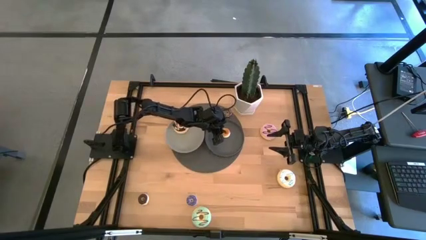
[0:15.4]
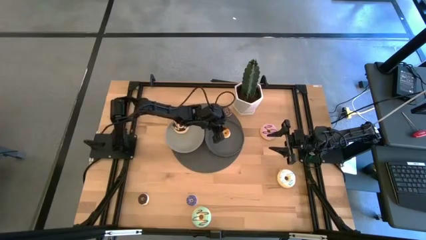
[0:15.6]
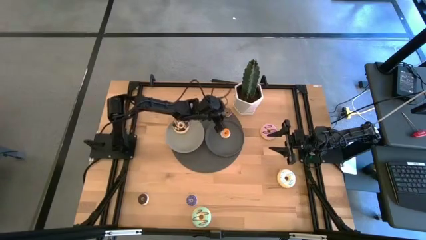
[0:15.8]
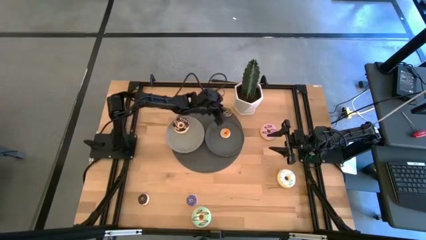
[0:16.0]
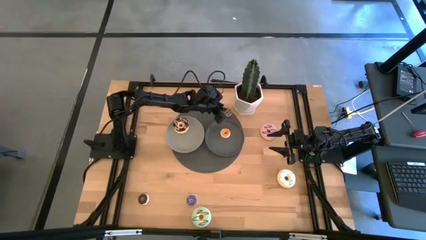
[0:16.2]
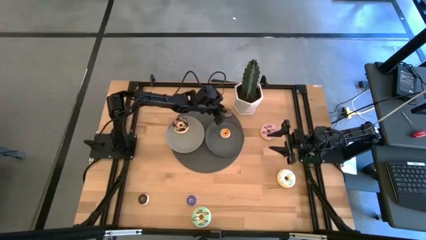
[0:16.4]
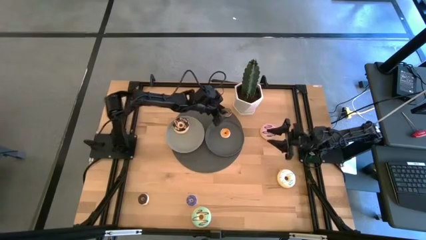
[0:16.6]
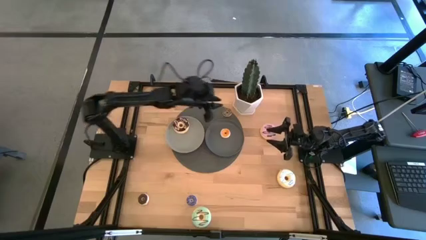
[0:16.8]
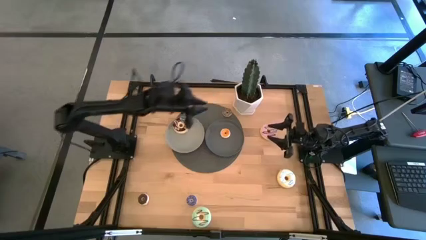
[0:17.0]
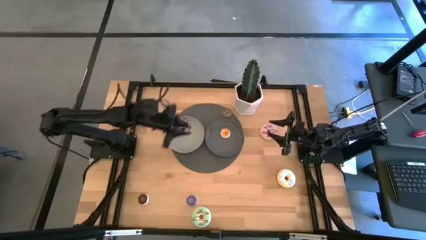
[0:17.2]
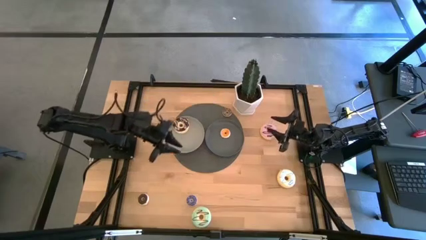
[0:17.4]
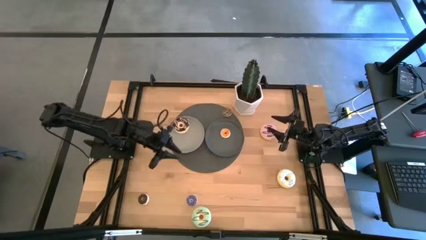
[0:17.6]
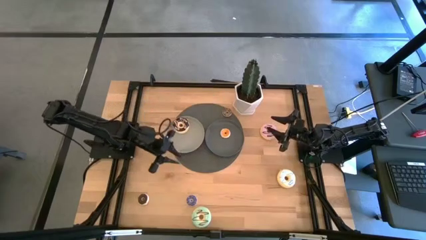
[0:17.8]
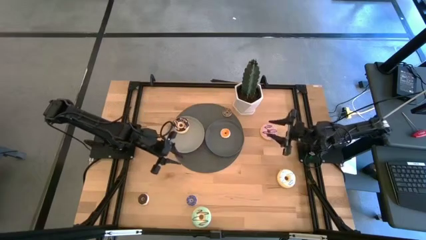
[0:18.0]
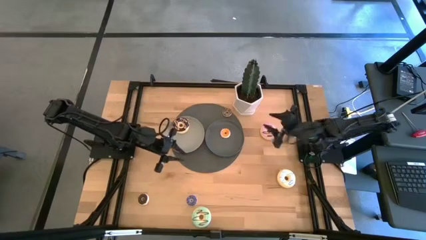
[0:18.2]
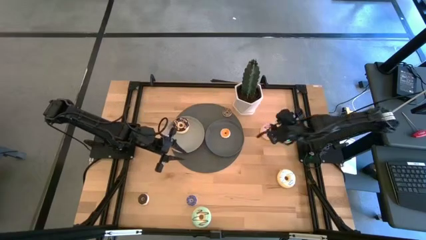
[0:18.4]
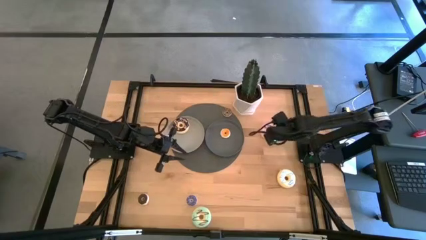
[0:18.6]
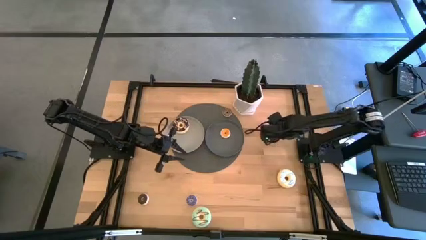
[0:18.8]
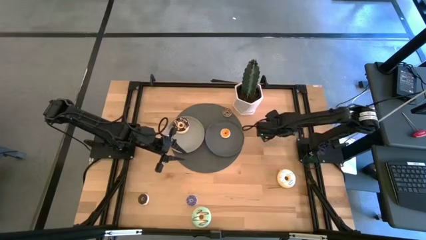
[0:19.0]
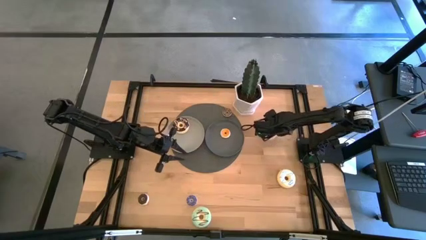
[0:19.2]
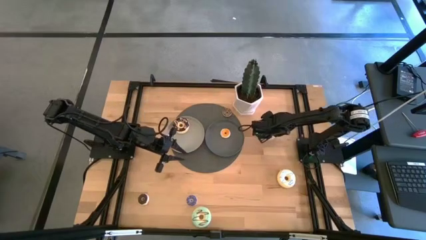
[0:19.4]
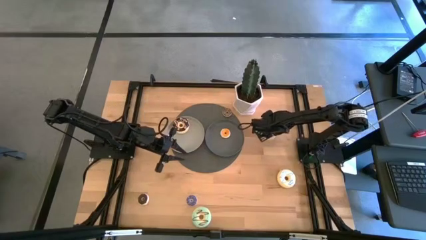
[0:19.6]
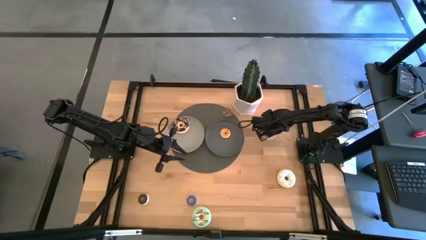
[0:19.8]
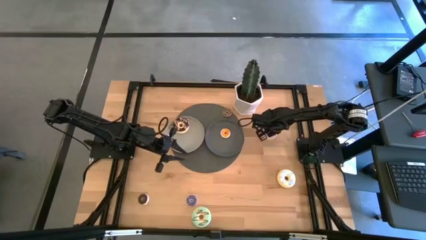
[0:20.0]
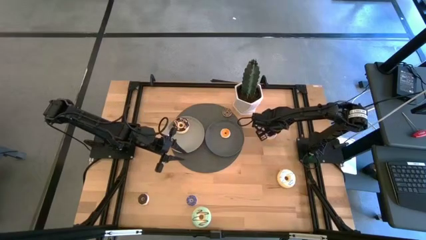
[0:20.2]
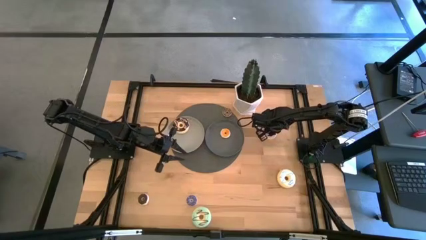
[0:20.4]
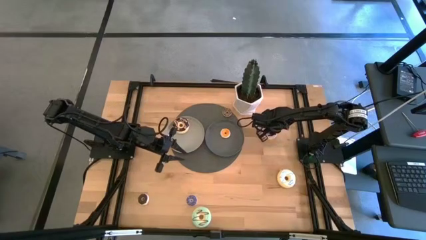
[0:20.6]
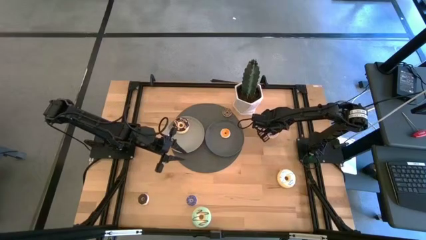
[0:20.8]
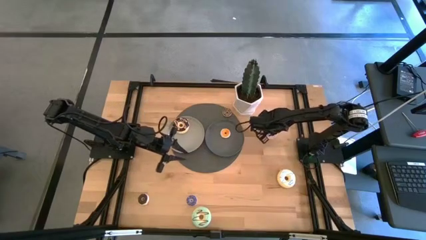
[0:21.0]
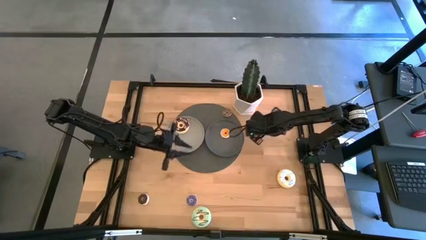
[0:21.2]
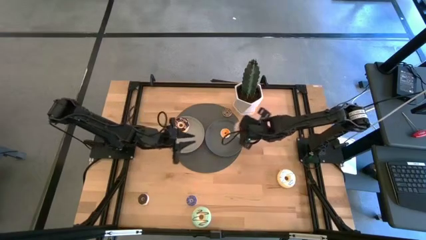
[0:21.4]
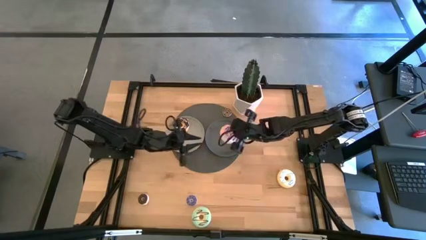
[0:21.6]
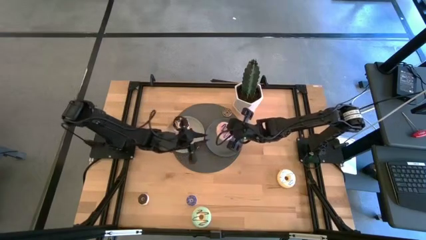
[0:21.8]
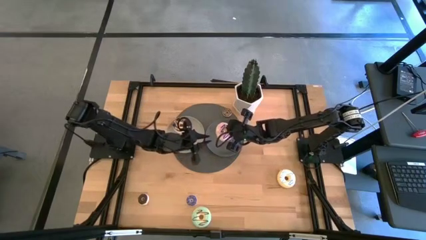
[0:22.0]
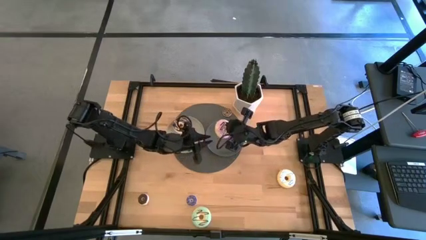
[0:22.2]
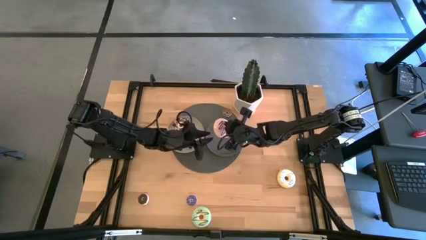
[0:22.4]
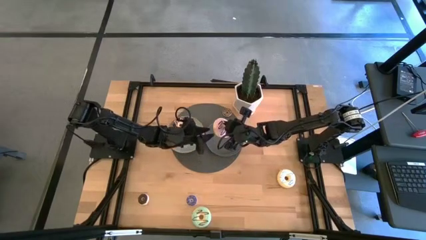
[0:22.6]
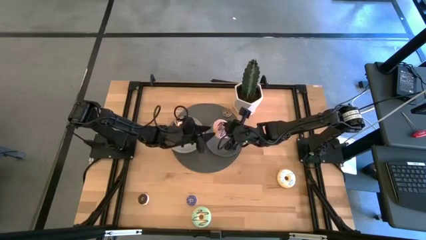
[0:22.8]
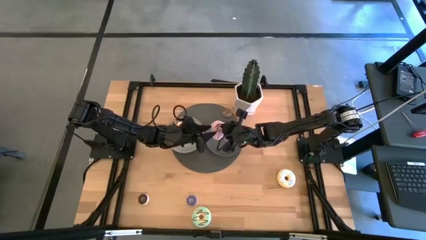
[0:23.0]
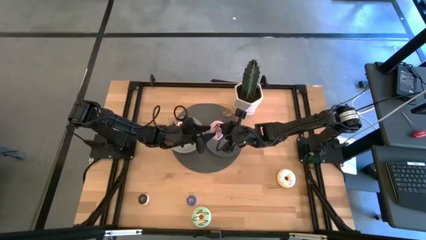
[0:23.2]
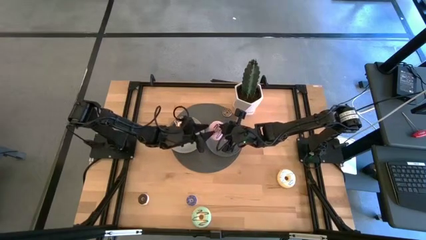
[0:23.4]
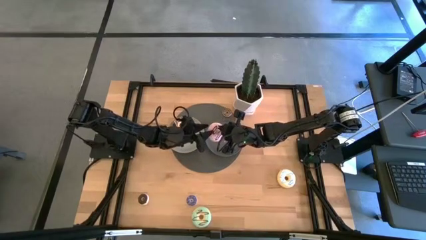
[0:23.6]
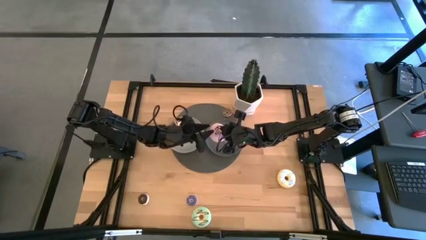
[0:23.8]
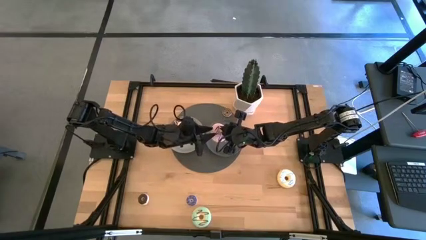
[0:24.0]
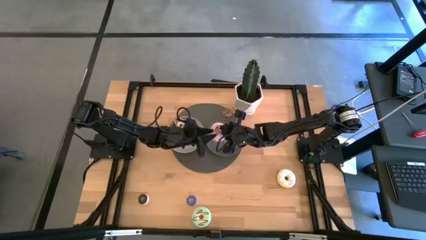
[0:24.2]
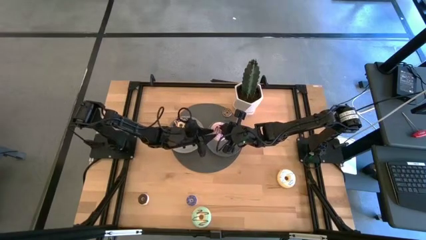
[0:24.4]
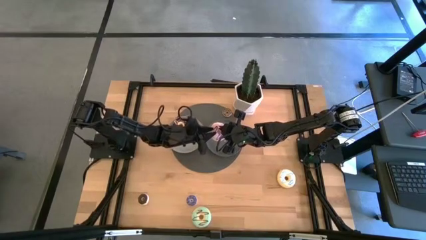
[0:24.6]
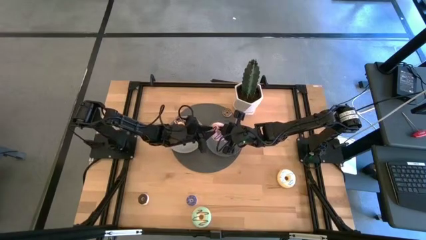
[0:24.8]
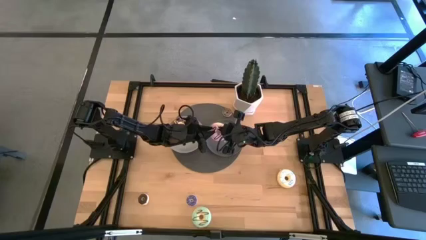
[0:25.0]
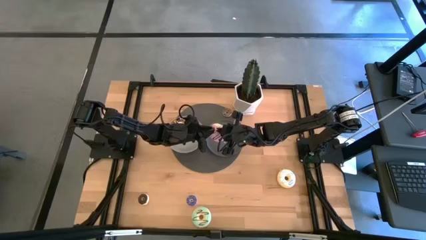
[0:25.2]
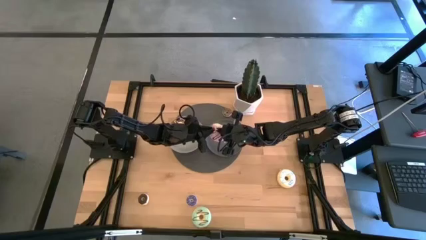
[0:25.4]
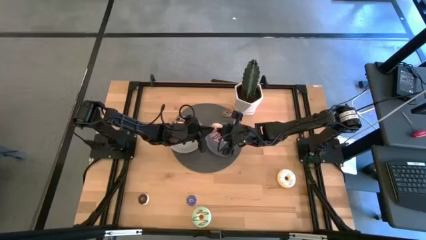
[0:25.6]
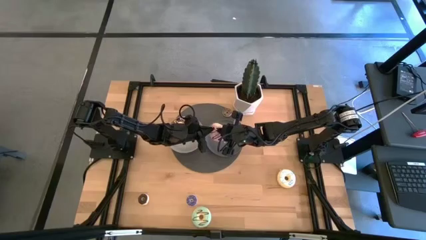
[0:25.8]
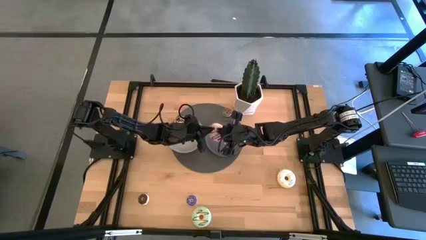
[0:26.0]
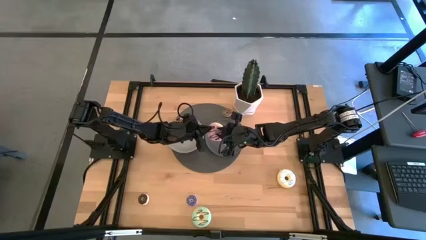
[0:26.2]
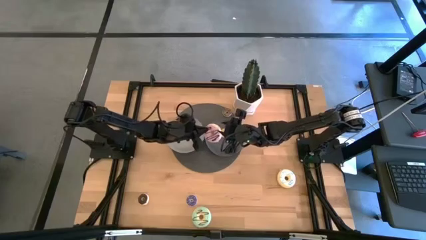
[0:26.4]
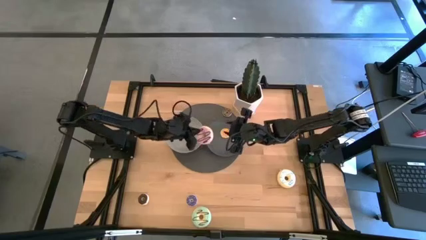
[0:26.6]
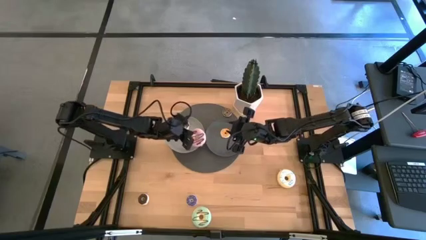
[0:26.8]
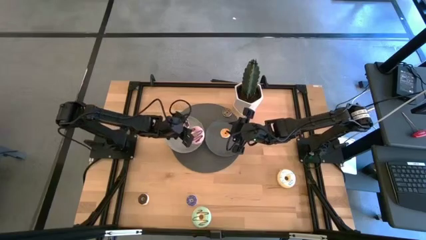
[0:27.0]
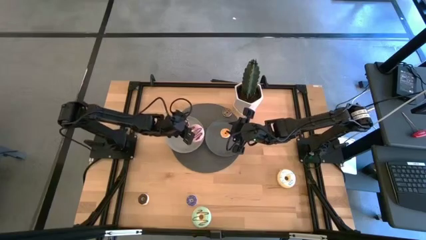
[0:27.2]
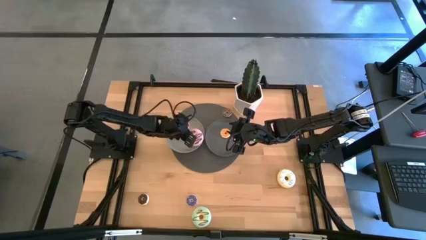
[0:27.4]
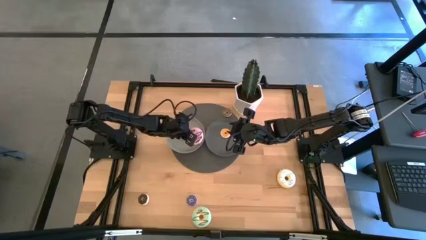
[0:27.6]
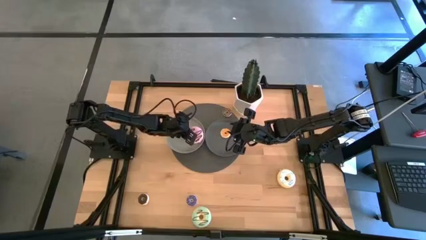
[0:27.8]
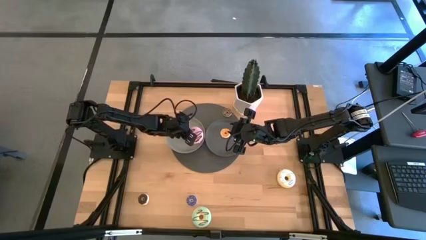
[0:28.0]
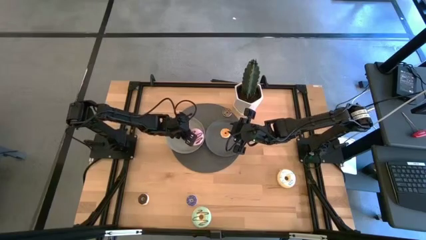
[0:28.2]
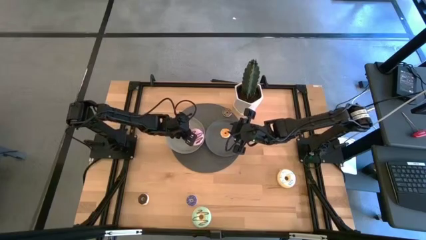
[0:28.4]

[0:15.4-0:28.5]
Task: Pick & Place donuts
Put the large purple donut on the light gray plate

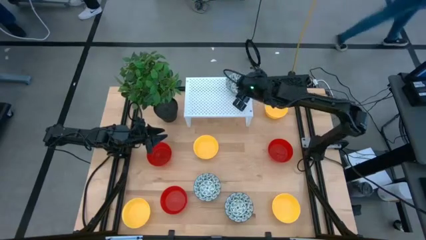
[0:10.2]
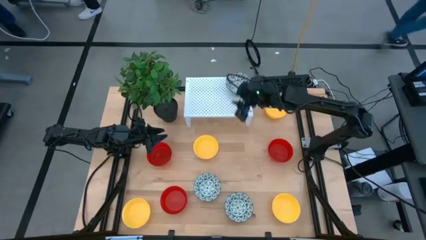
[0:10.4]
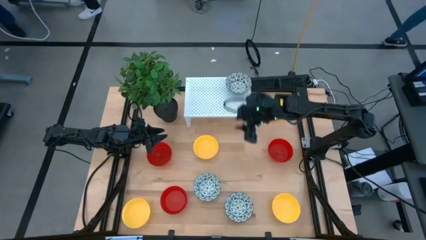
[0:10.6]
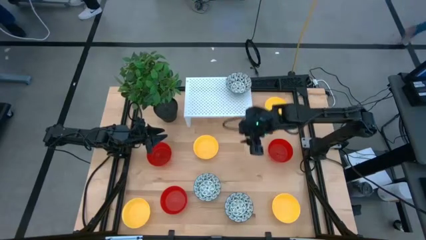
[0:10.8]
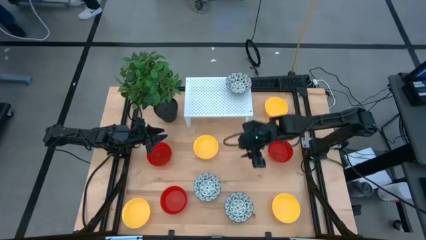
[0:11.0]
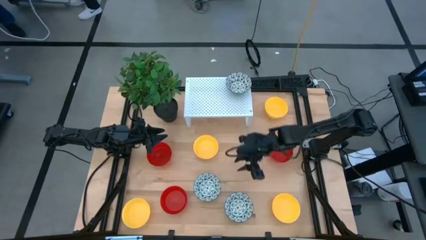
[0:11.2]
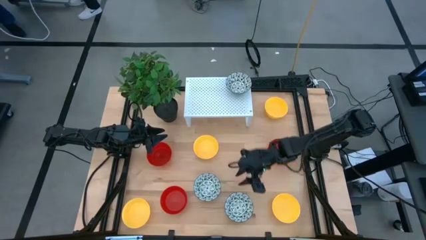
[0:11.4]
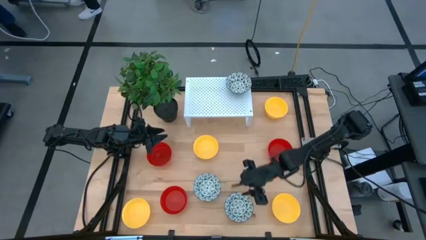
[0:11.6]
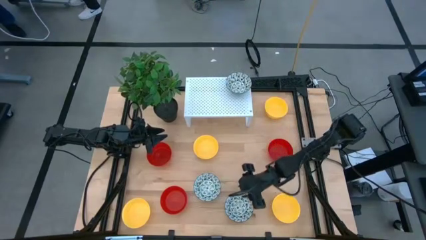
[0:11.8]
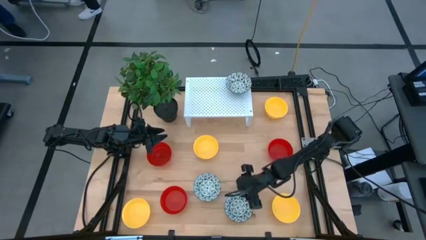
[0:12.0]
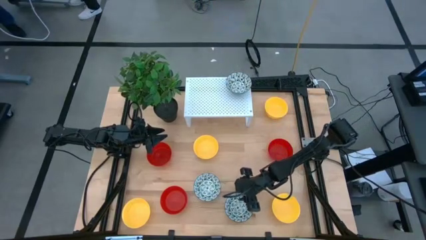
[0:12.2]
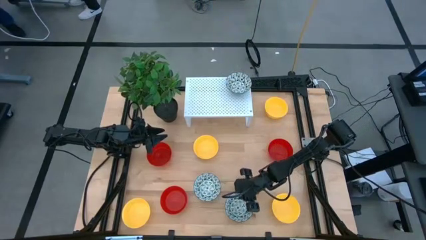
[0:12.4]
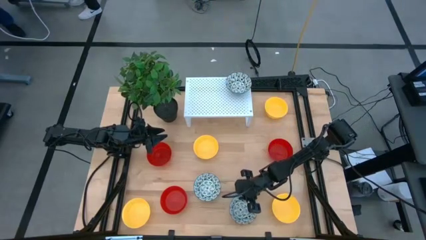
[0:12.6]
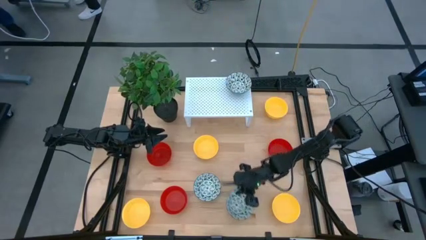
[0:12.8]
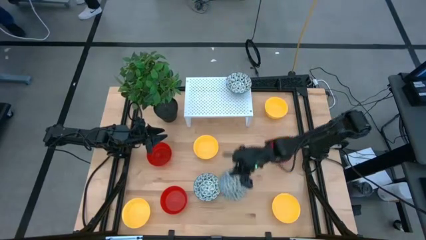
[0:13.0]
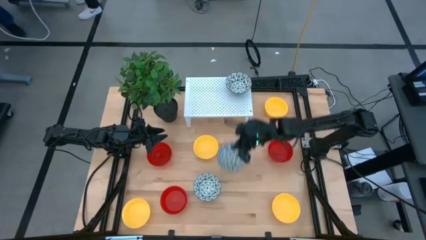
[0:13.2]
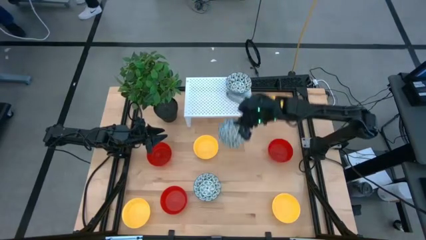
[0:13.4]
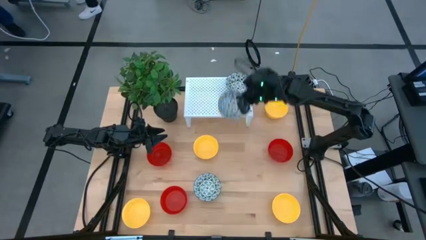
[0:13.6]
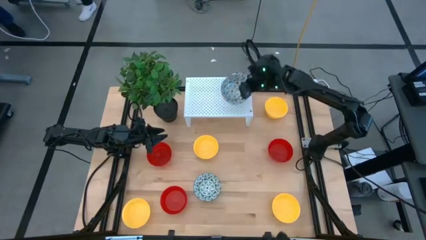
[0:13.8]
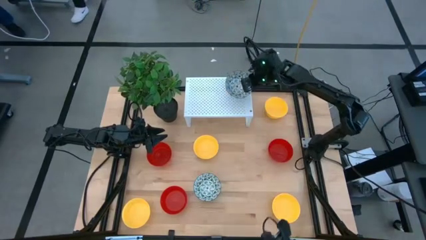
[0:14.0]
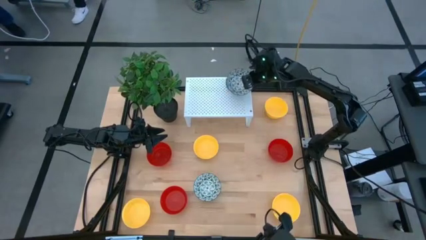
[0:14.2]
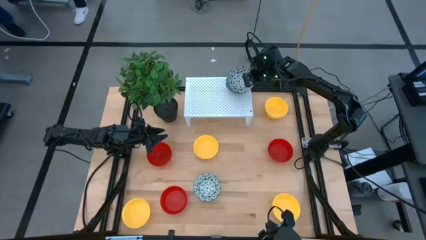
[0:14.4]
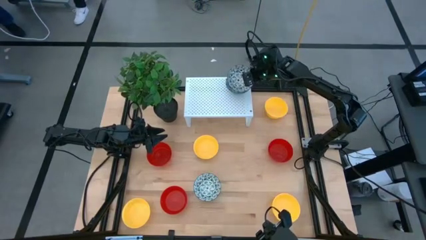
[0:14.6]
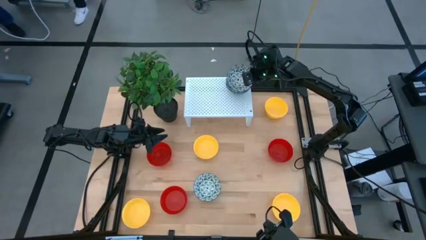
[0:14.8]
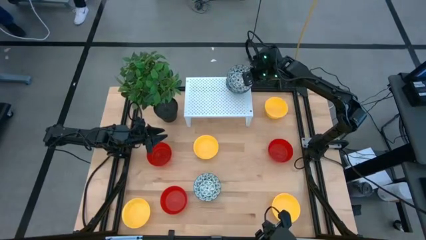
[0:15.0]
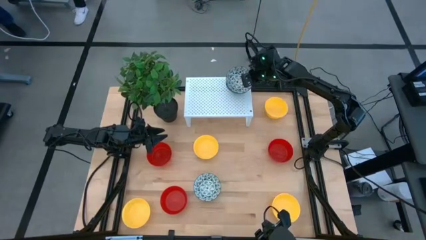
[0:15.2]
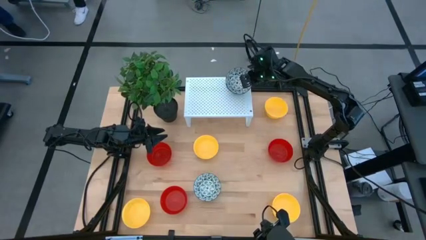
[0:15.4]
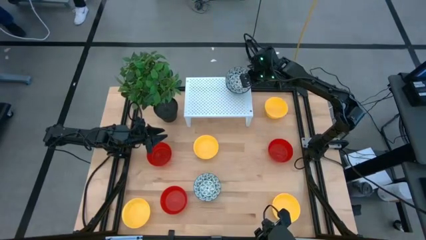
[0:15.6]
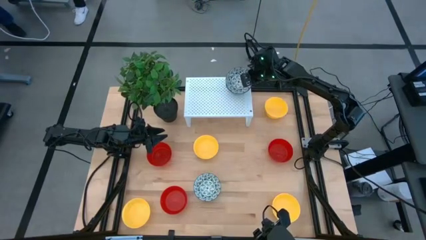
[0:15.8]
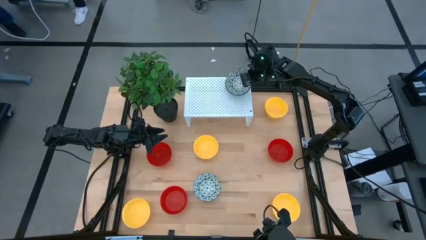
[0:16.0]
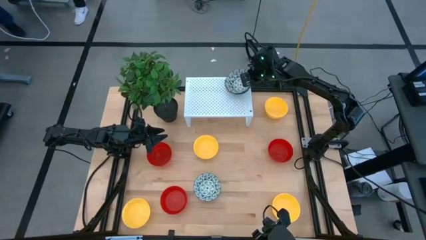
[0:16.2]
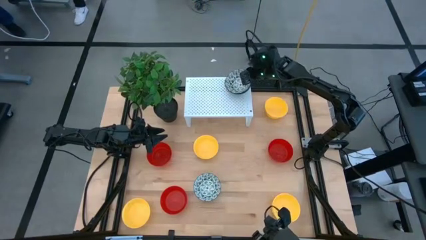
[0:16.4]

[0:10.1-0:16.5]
Task: Pick & Place Mini bowls
Stack the blue patterned bowl on the blue patterned bowl on the shelf
